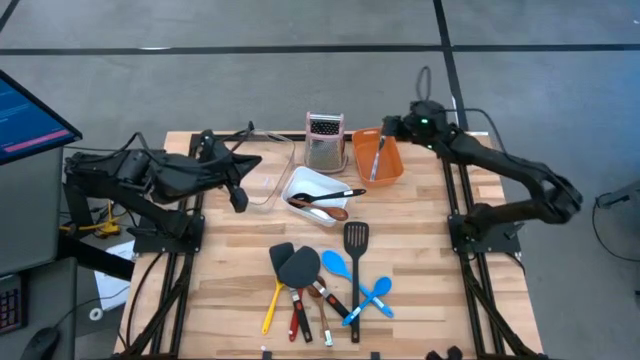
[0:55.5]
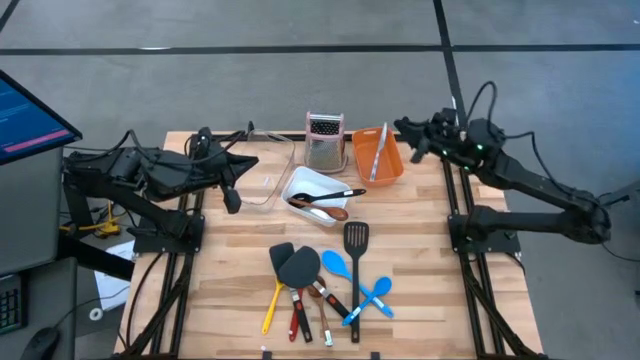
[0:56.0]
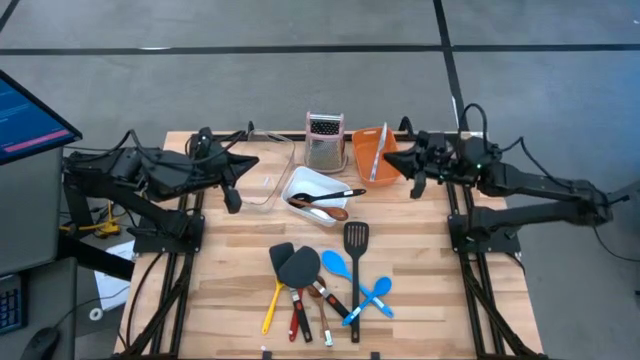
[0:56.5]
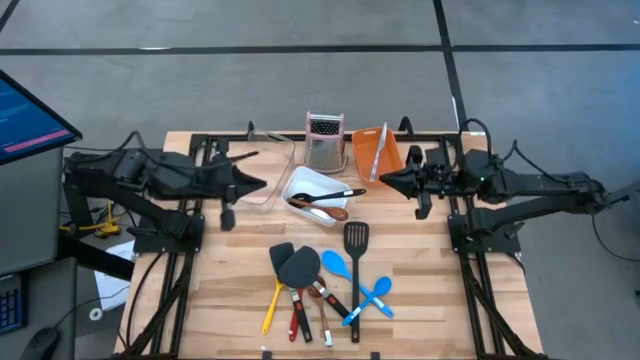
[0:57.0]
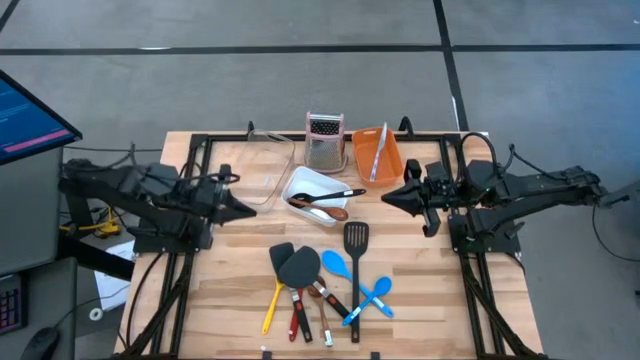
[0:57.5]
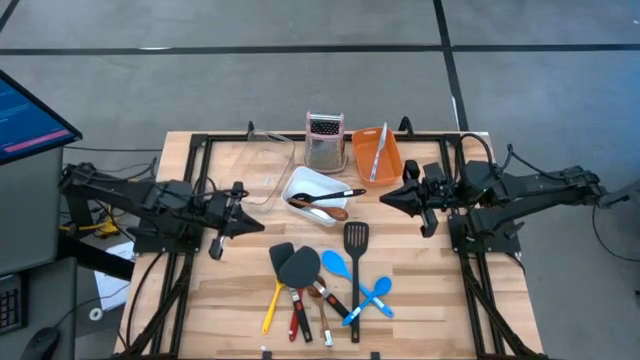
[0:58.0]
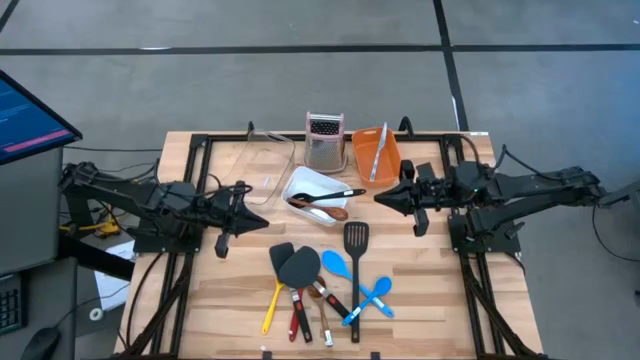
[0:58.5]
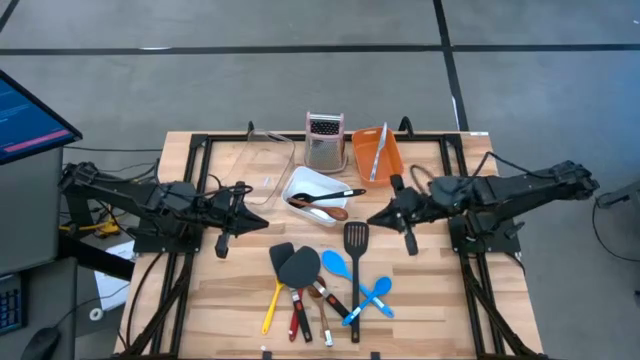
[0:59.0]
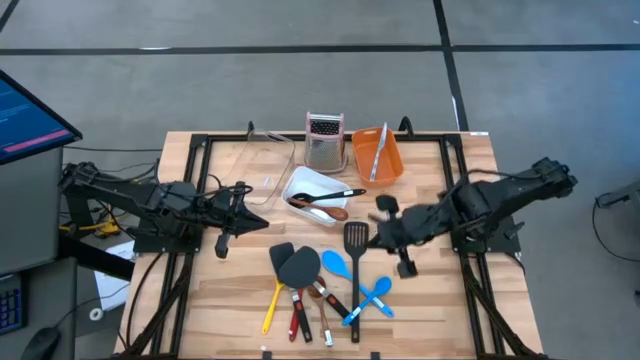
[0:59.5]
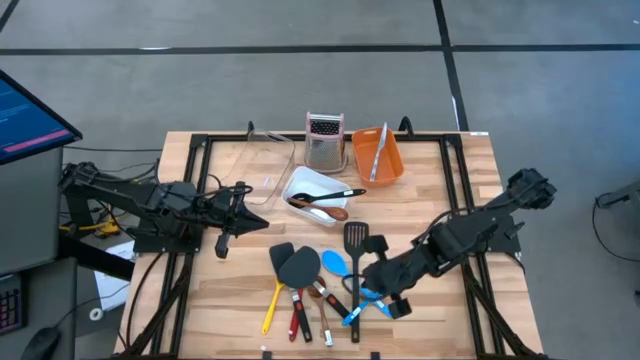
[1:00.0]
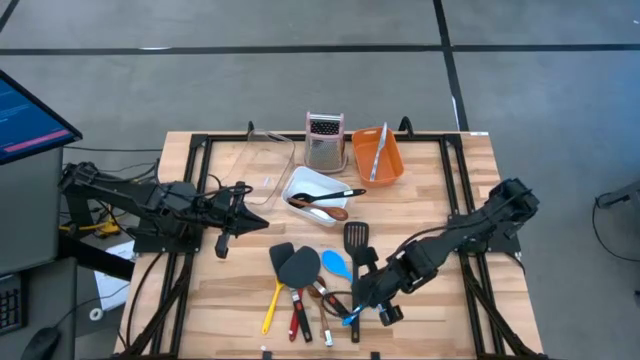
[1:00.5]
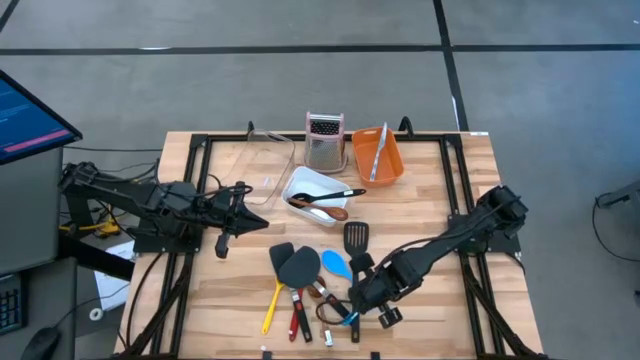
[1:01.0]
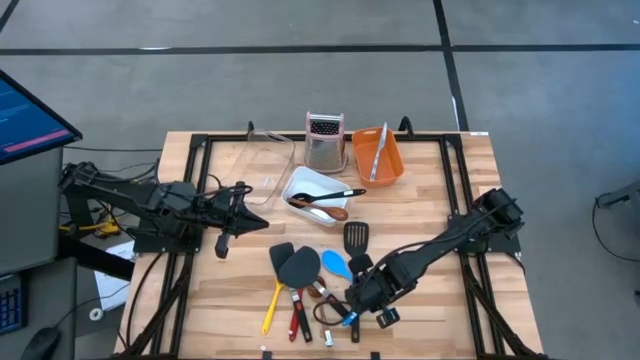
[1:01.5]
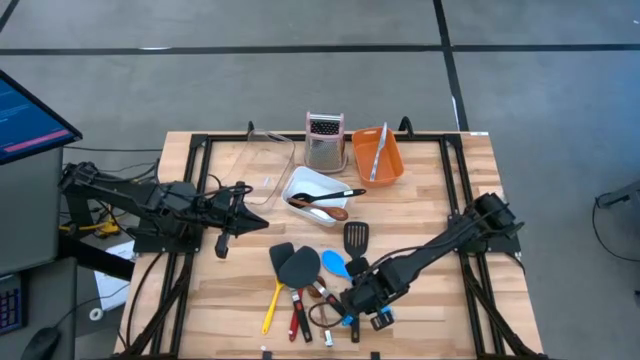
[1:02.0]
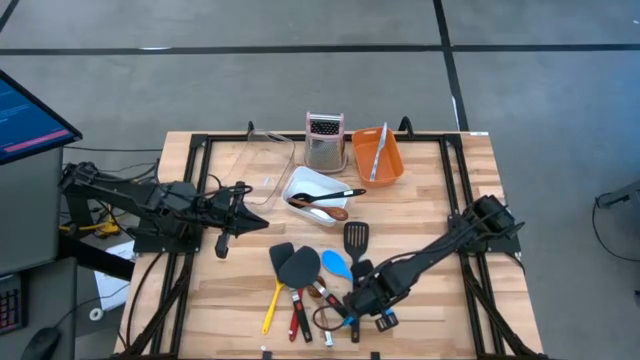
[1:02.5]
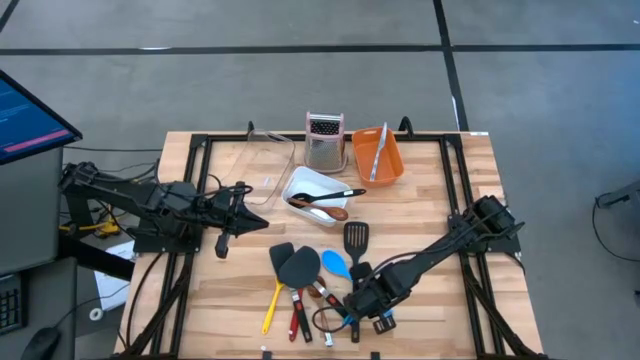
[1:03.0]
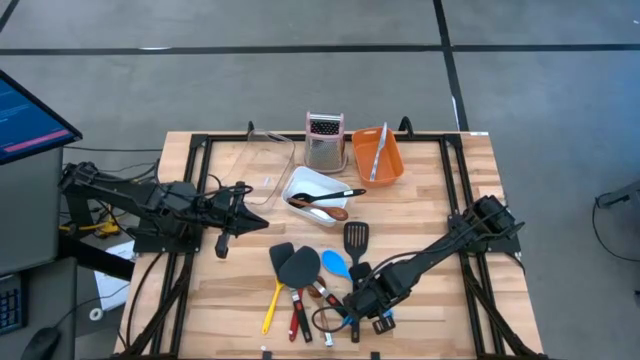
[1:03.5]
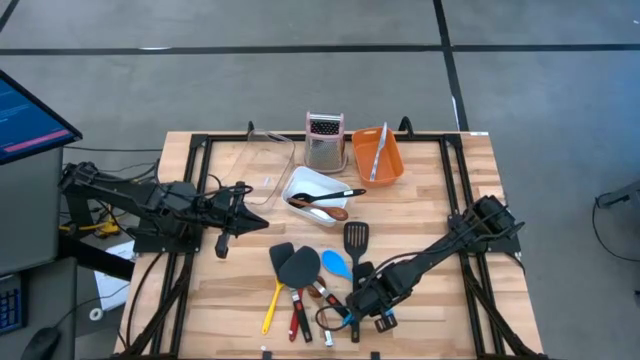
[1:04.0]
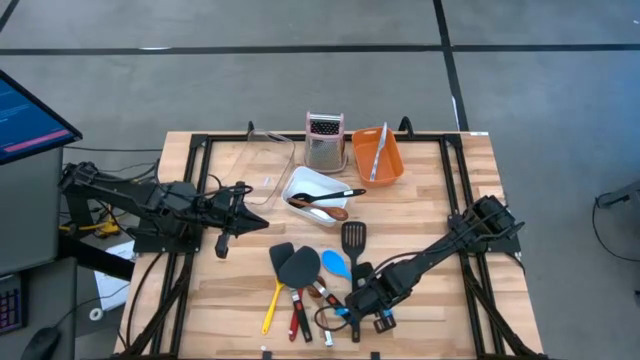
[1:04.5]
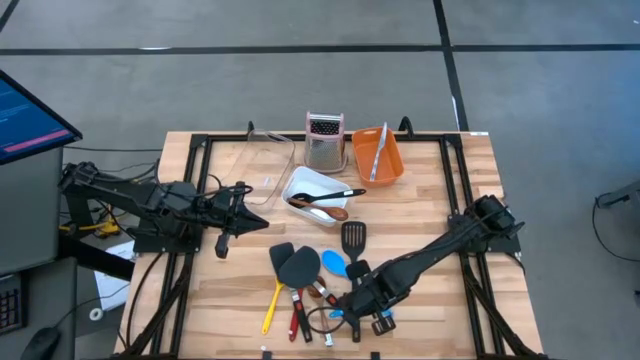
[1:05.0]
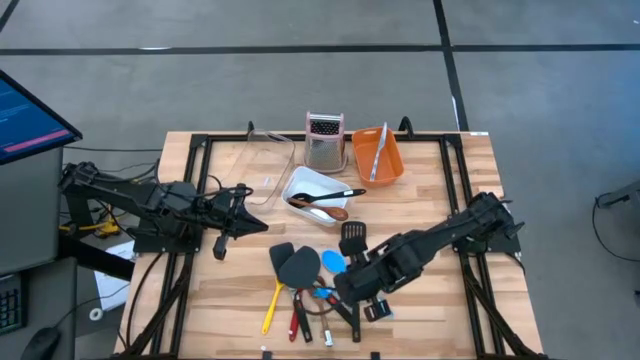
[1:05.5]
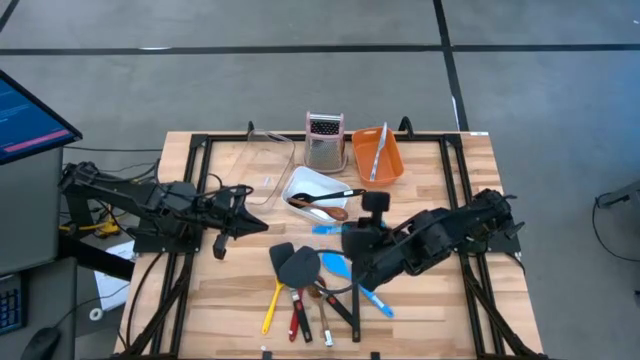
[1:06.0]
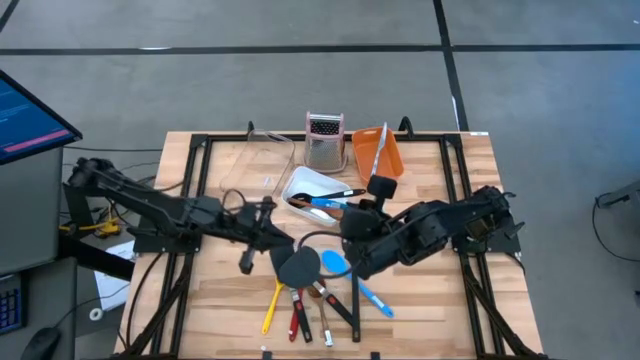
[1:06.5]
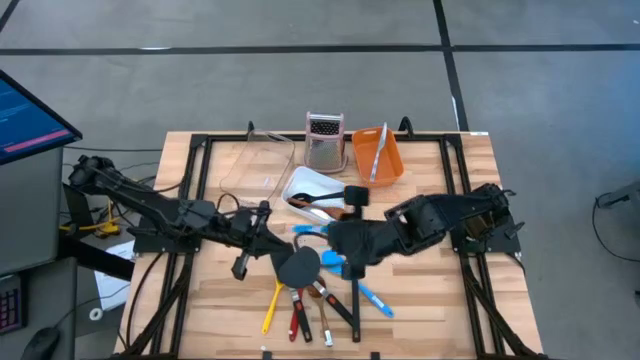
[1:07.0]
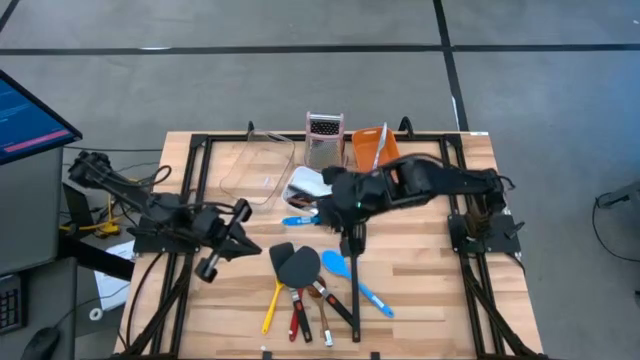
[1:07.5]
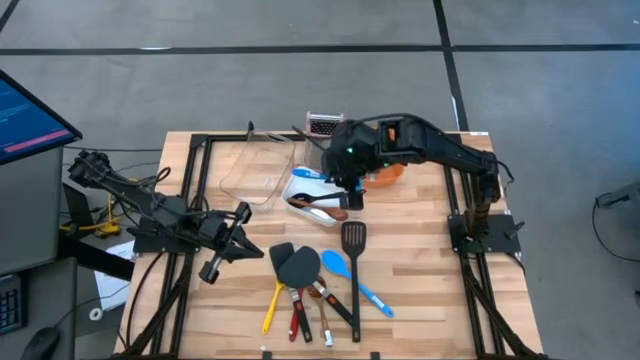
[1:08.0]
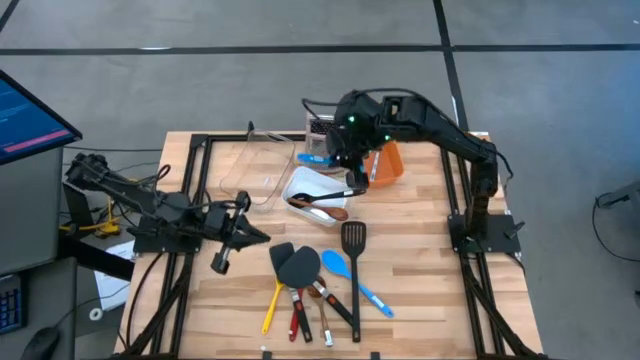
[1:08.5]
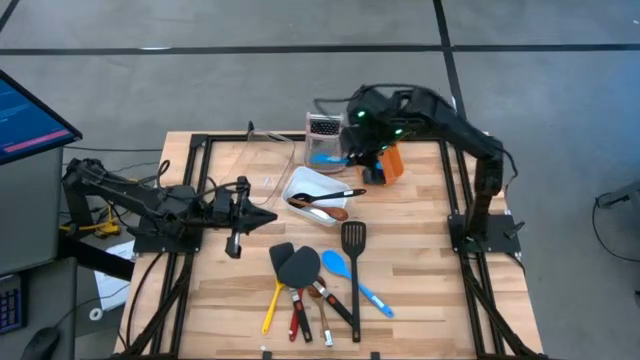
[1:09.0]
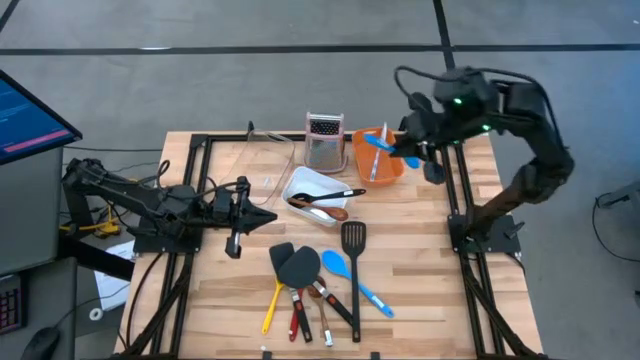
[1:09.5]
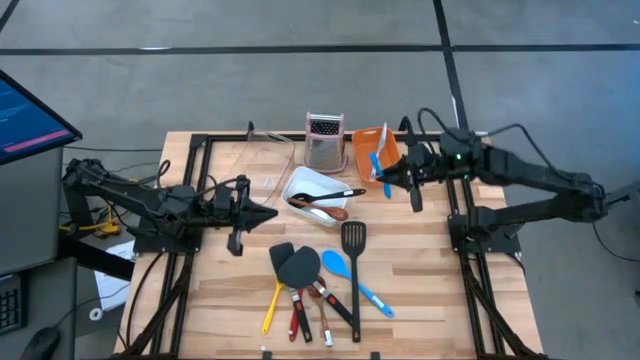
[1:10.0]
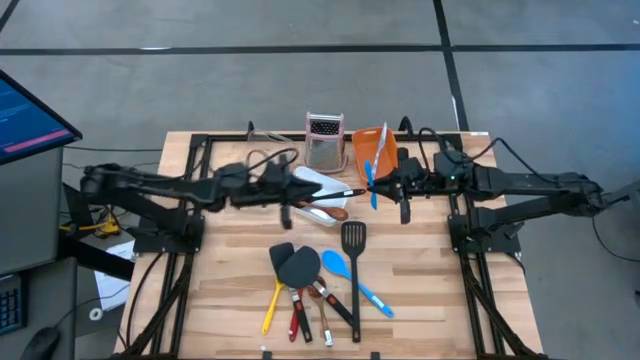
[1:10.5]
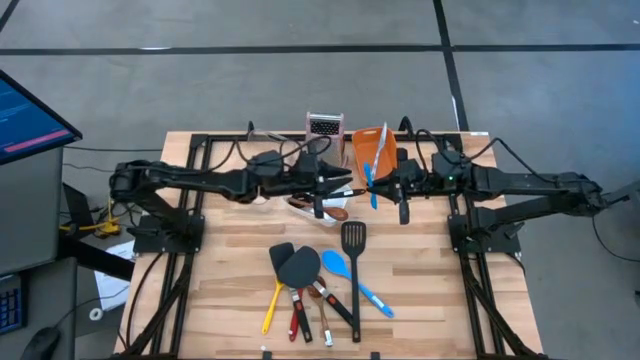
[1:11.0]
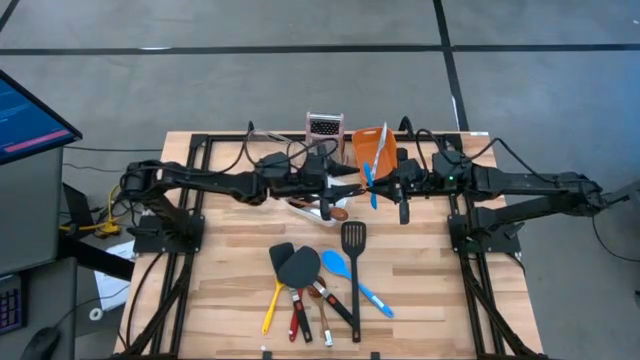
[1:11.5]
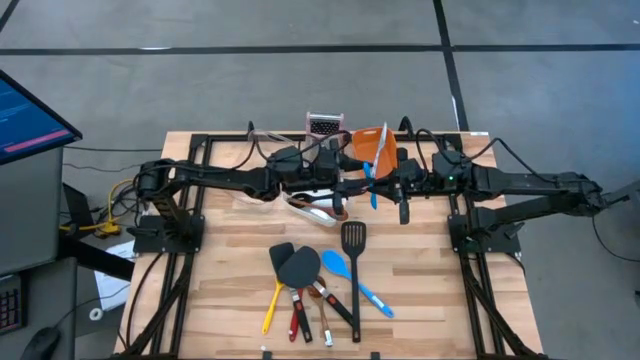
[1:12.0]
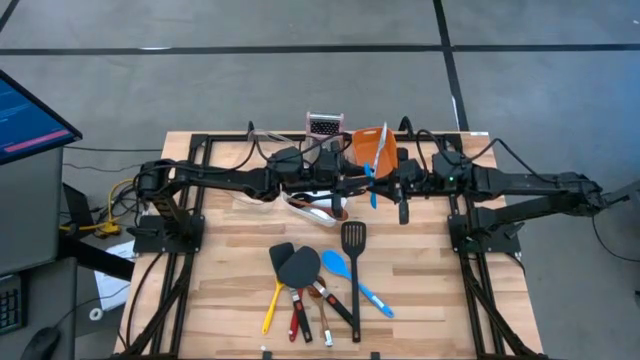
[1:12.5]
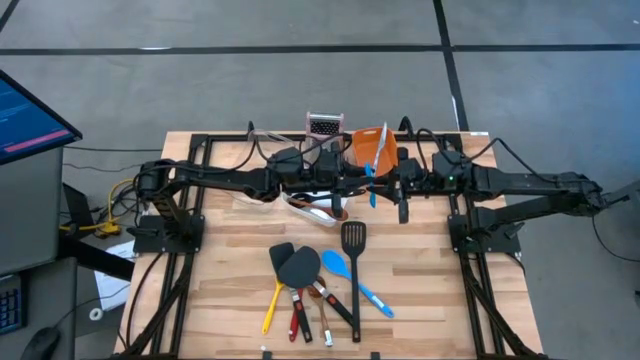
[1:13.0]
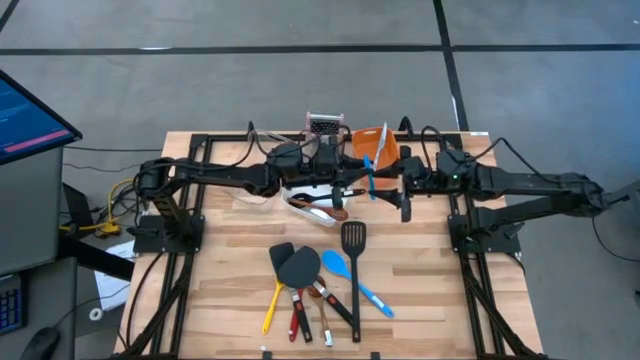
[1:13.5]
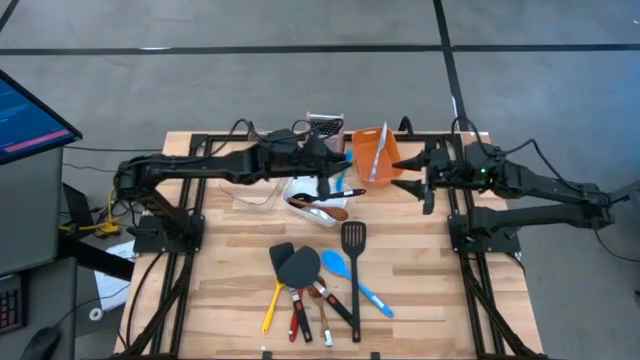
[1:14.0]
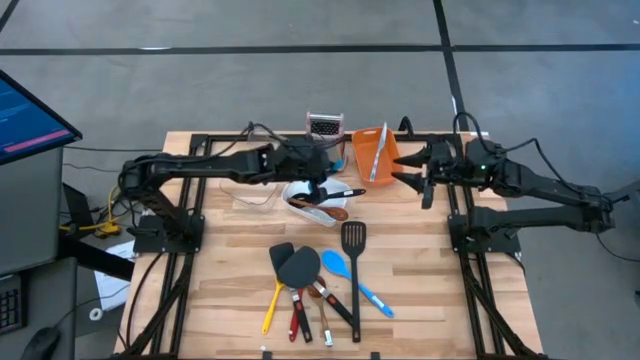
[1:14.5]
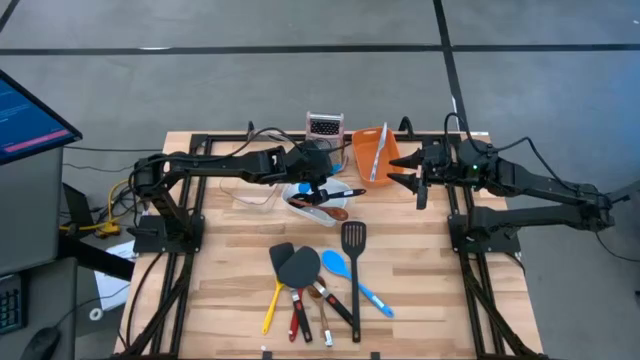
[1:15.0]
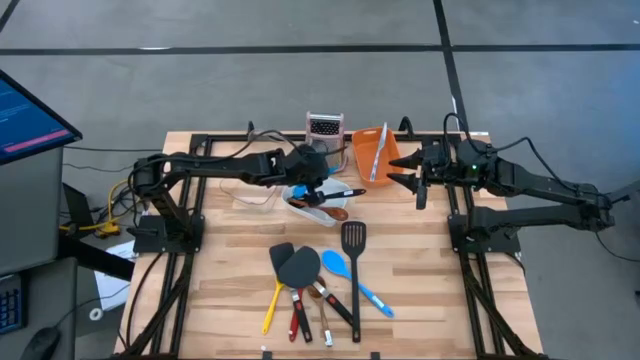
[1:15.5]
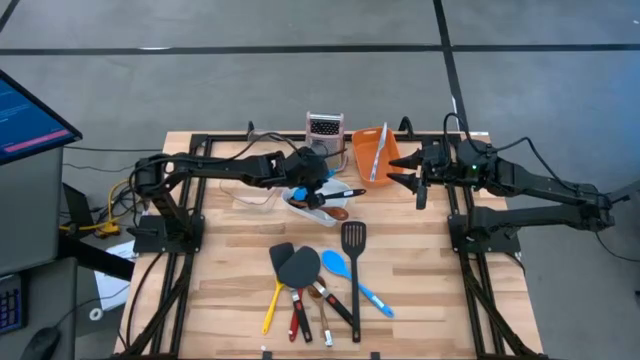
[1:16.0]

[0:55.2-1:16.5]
Task: Pick & Place Kitchen Items
Put the blue serving spoon into the white bin
